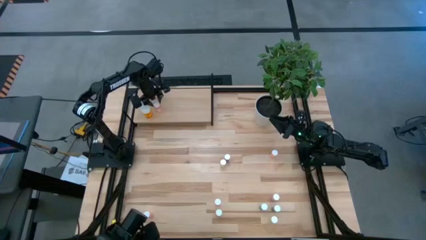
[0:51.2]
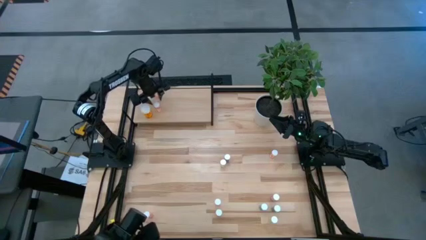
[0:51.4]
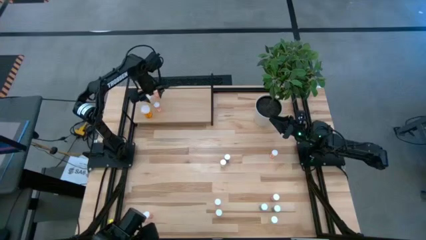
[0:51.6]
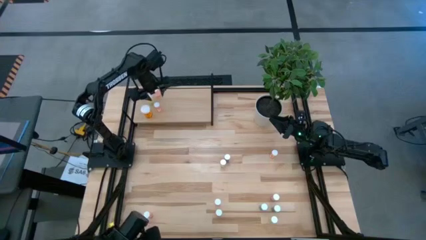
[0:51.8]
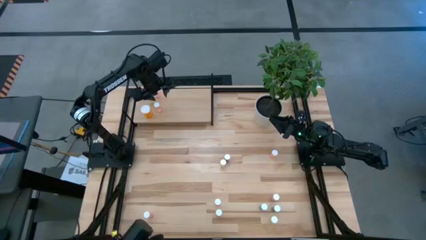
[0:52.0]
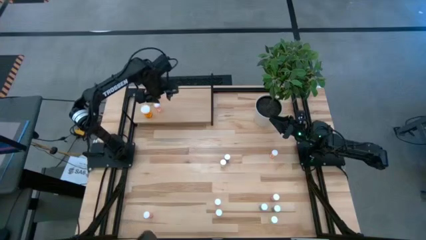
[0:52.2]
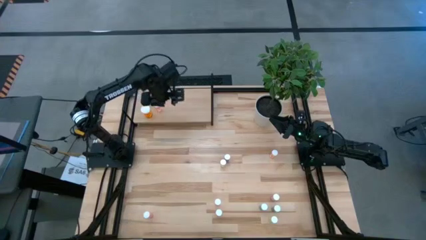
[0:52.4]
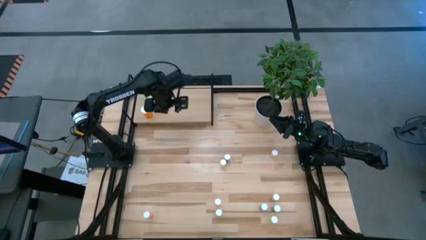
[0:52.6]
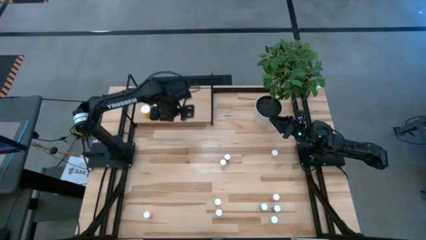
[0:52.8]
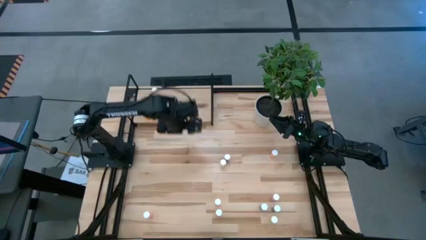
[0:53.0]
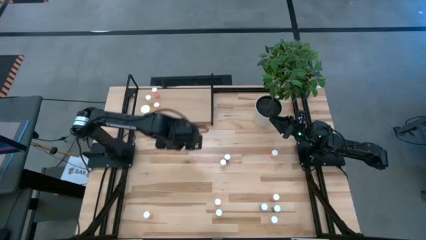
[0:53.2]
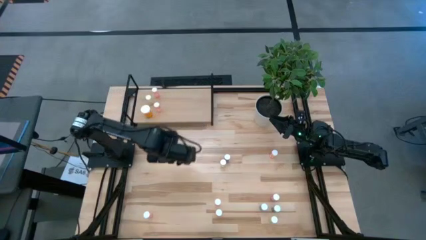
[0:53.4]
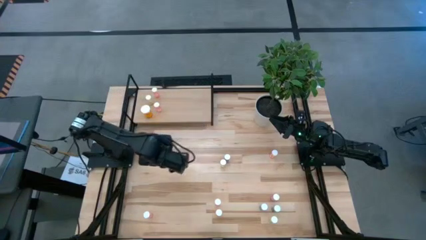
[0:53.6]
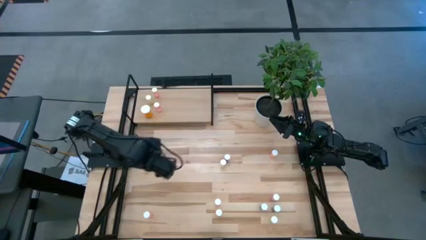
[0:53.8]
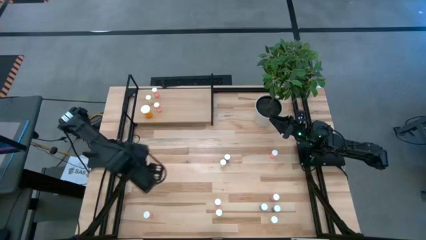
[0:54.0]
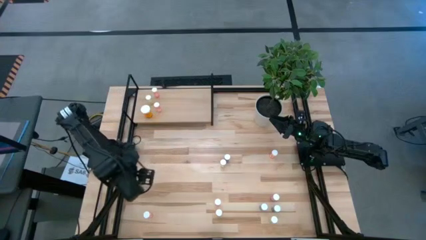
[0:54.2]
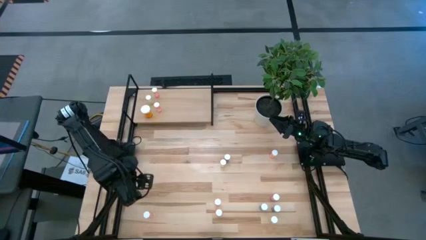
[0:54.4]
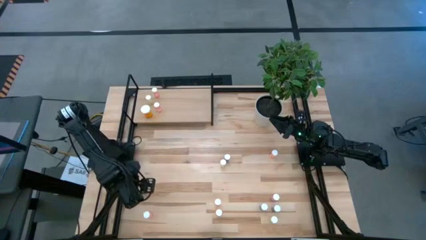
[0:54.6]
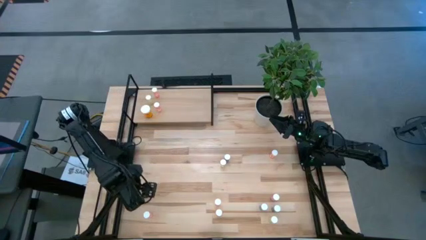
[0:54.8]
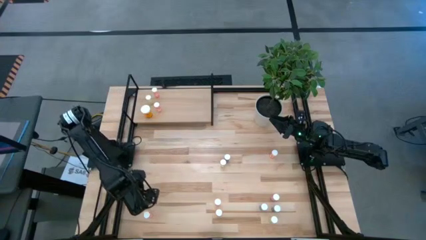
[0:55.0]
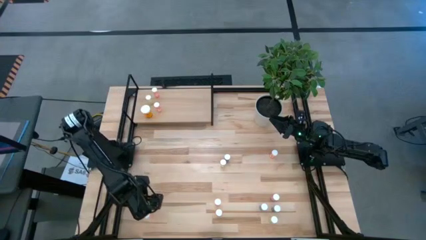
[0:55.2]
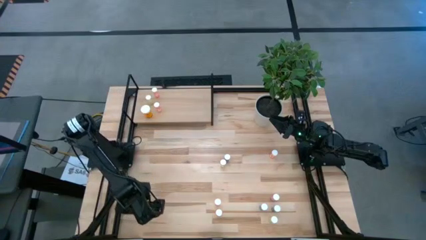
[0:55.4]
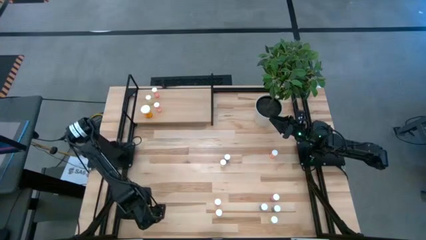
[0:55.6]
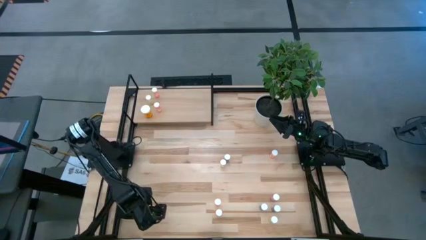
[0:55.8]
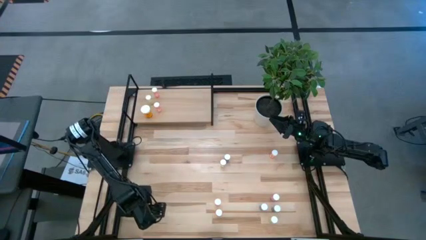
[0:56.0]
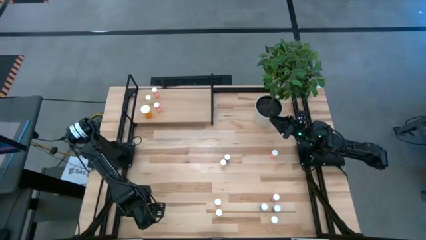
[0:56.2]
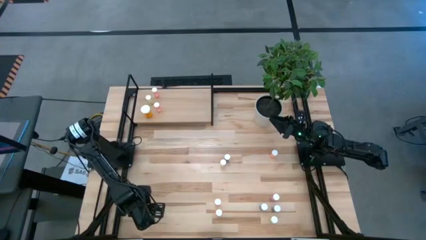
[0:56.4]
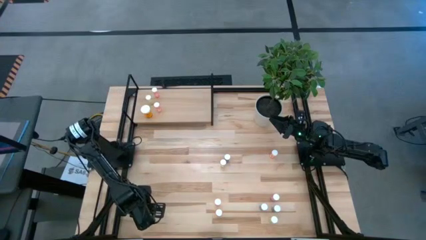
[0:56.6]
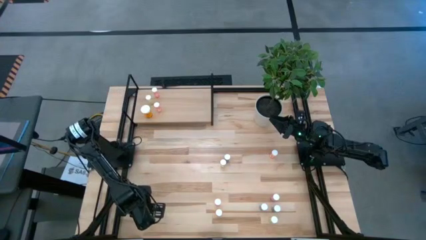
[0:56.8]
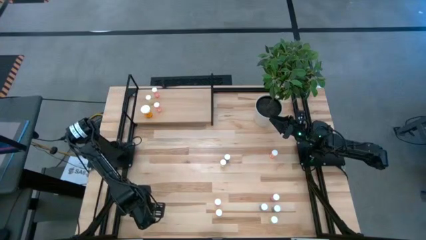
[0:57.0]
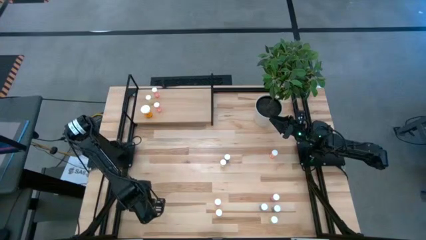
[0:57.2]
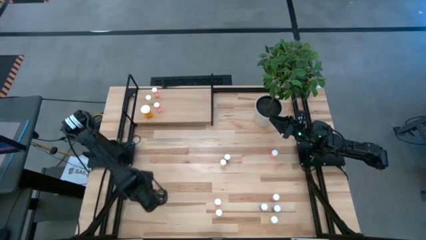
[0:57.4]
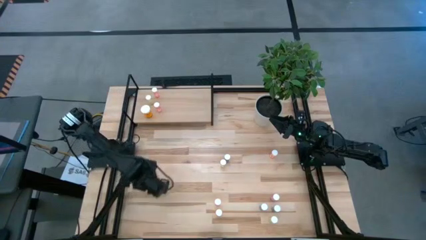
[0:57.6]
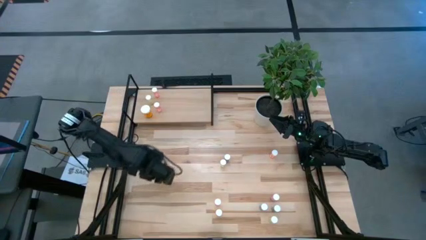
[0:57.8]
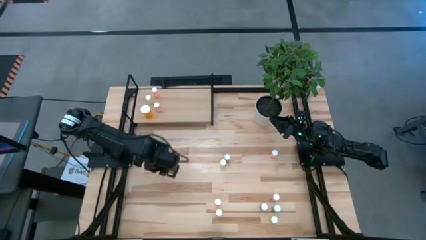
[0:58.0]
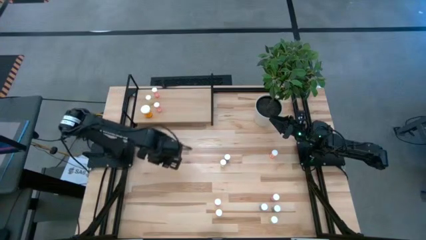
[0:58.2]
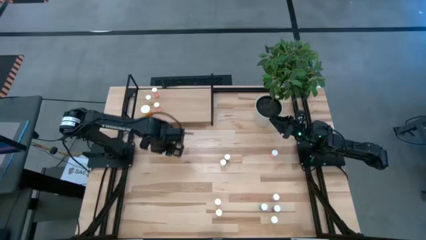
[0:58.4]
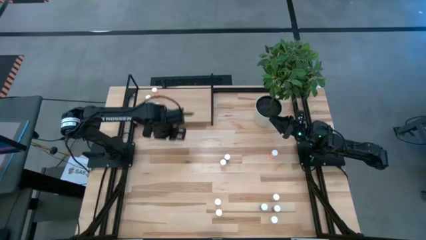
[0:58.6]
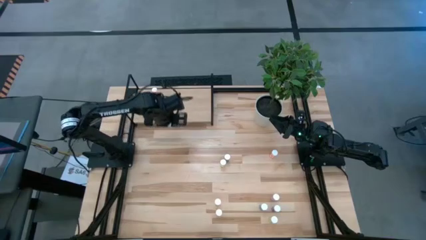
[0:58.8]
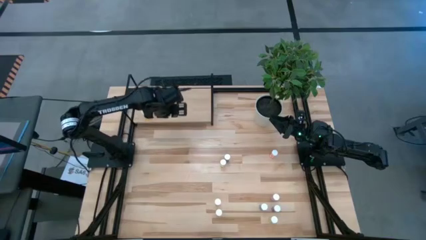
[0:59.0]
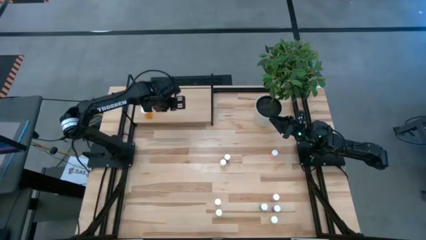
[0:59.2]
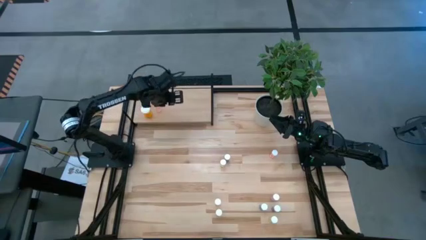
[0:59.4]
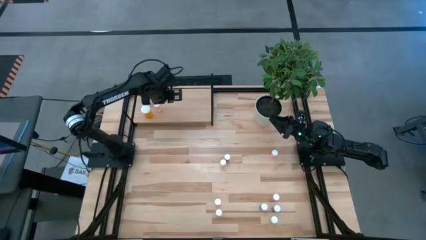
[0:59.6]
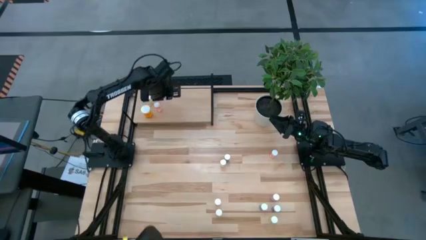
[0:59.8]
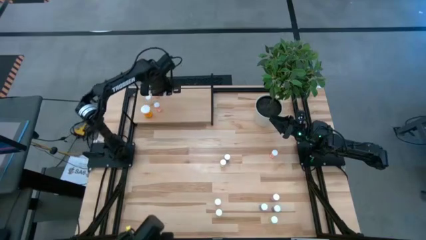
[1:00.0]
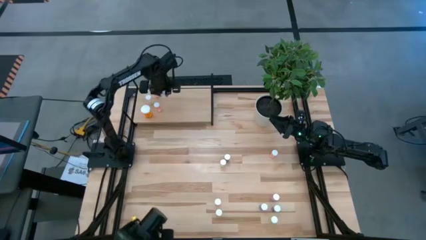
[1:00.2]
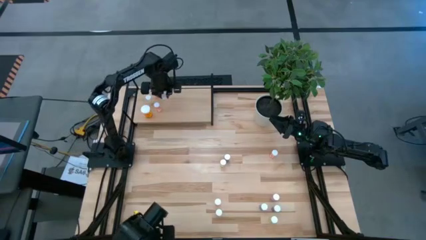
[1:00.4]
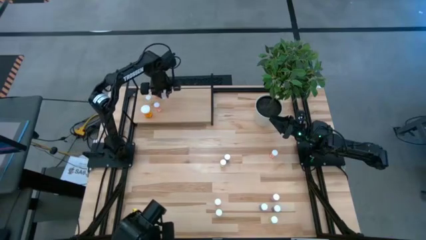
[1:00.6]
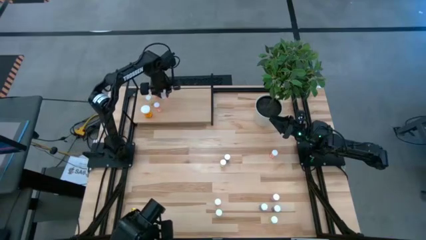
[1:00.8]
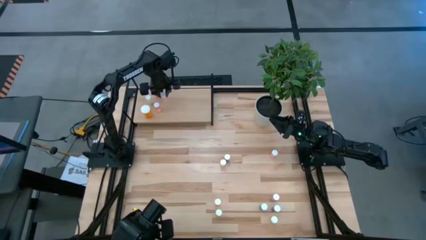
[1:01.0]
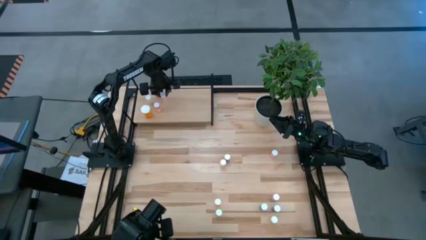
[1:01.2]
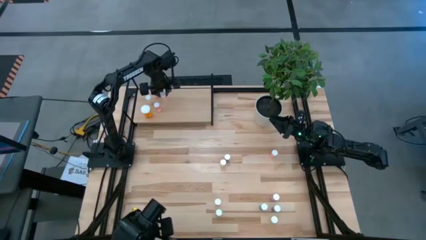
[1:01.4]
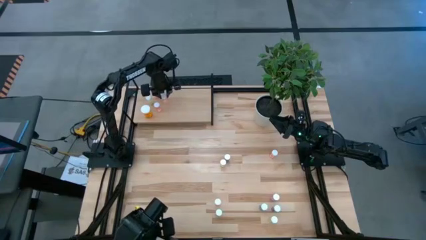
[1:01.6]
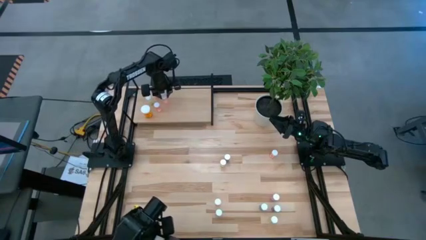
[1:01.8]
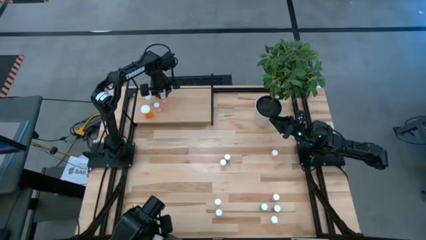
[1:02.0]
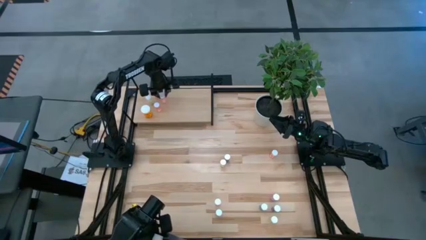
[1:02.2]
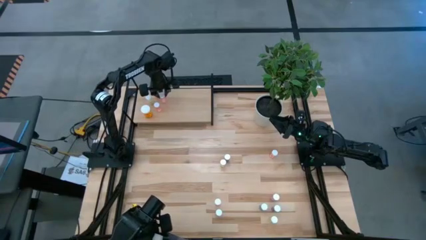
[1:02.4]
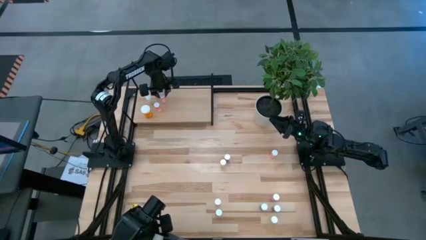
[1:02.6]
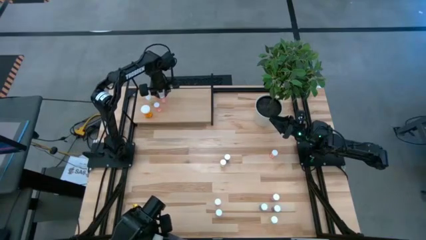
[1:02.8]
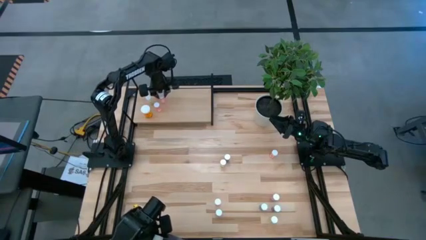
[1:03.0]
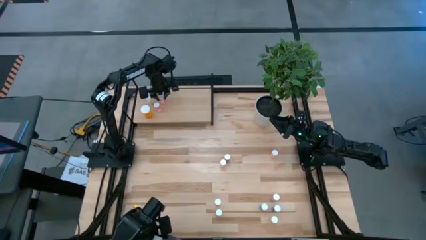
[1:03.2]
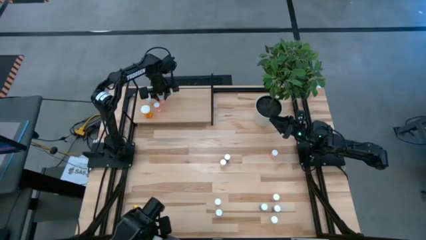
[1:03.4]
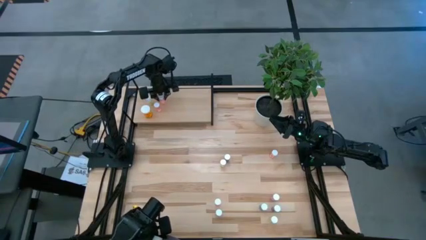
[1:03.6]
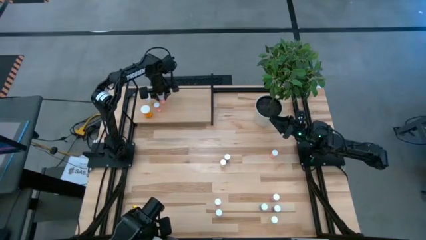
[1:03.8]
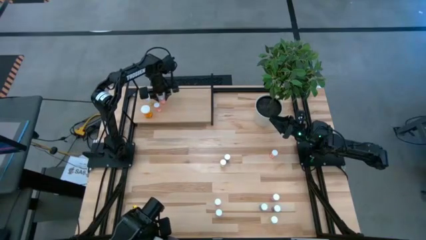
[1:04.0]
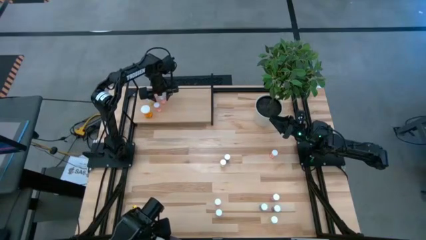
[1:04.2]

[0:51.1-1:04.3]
Task: Pick and place medicine bottles onto shelf by color
Put the pink pill bottle on the shelf
